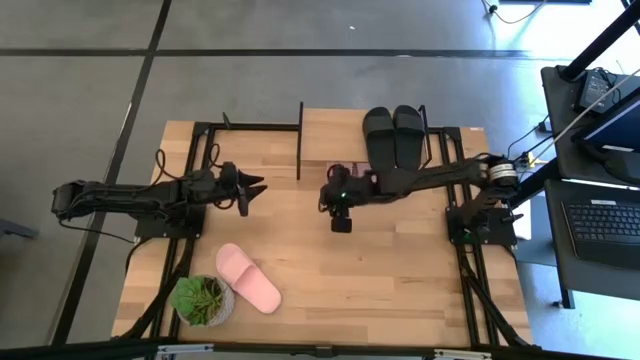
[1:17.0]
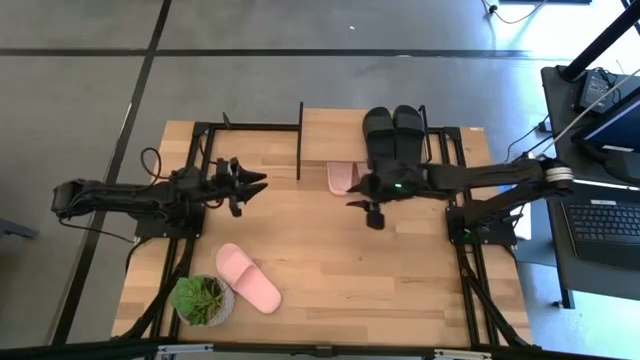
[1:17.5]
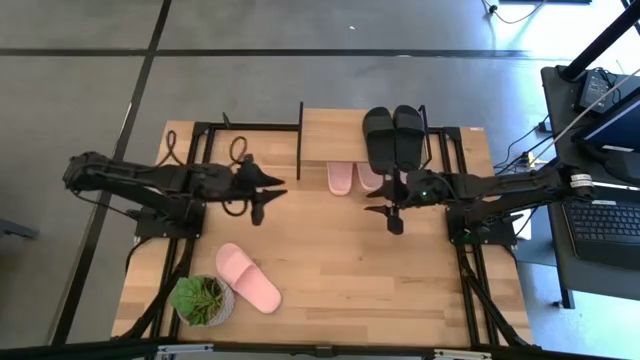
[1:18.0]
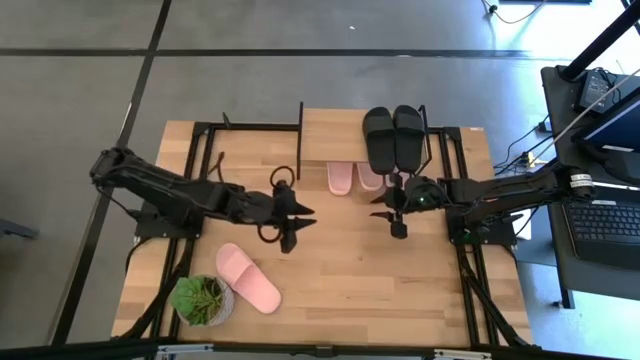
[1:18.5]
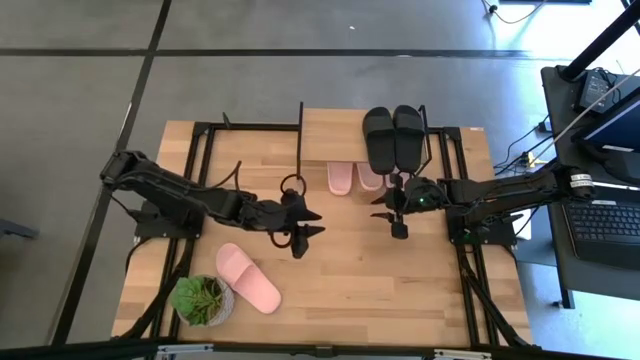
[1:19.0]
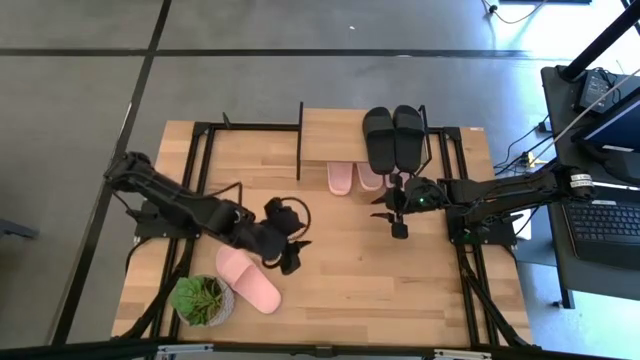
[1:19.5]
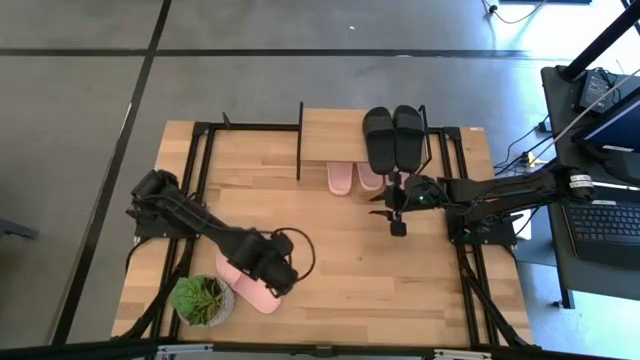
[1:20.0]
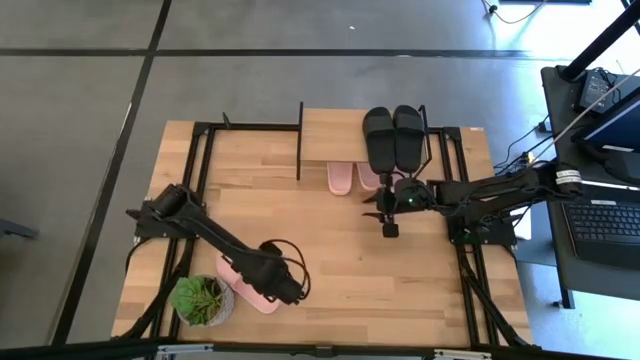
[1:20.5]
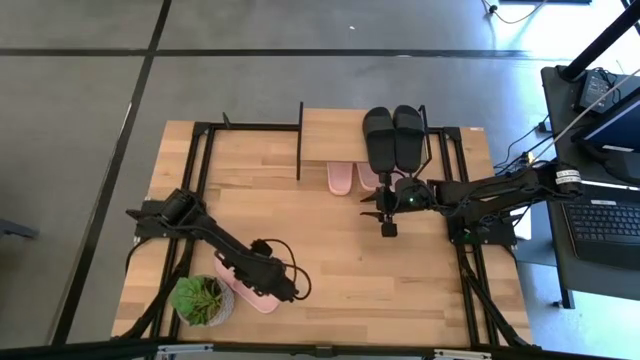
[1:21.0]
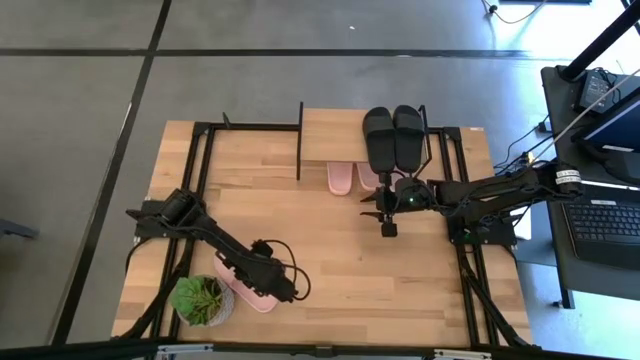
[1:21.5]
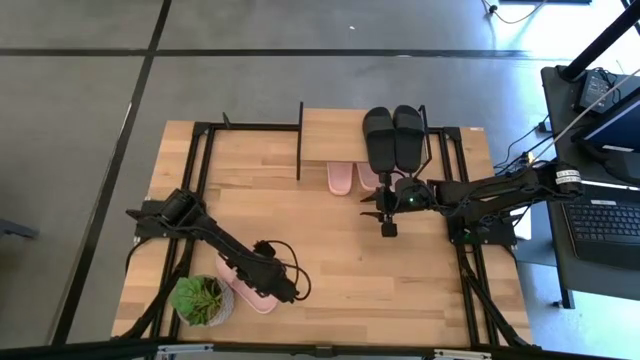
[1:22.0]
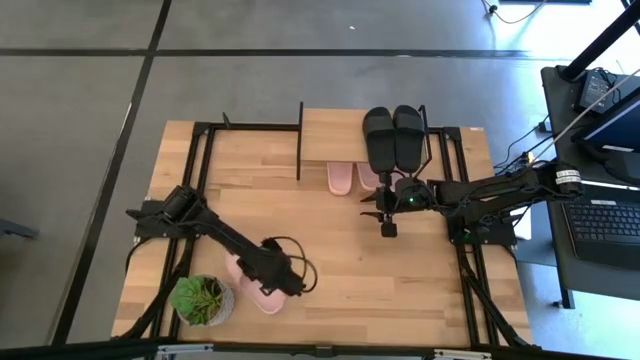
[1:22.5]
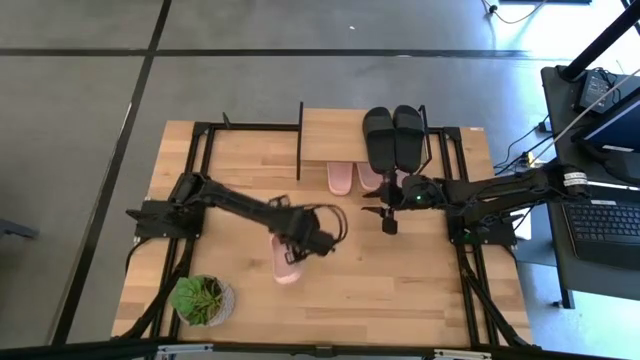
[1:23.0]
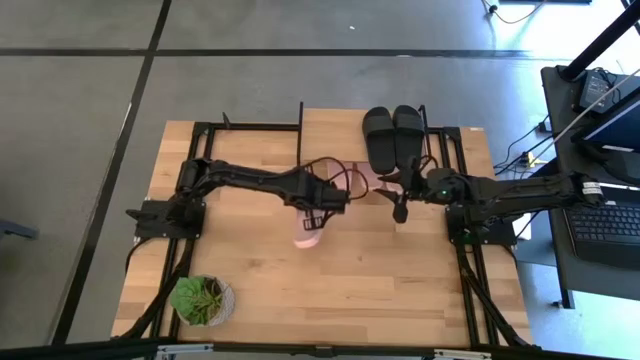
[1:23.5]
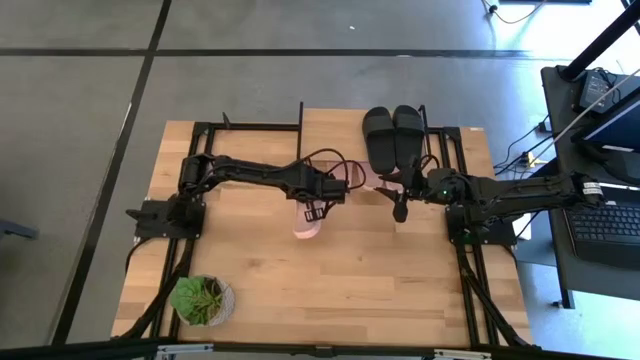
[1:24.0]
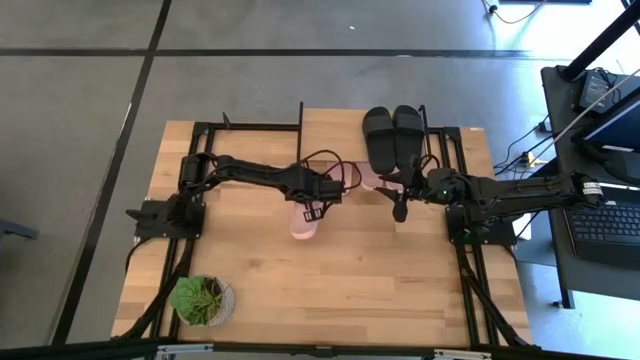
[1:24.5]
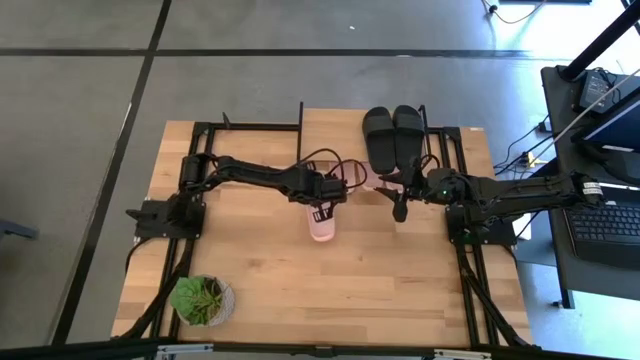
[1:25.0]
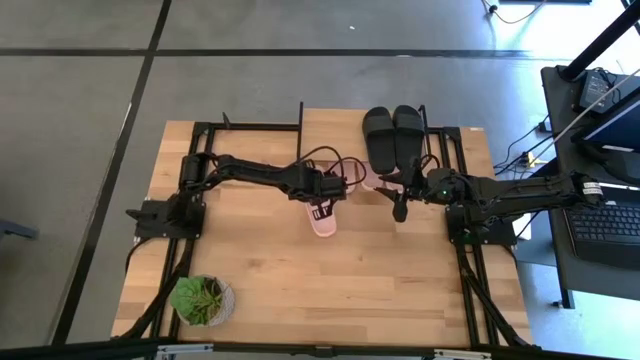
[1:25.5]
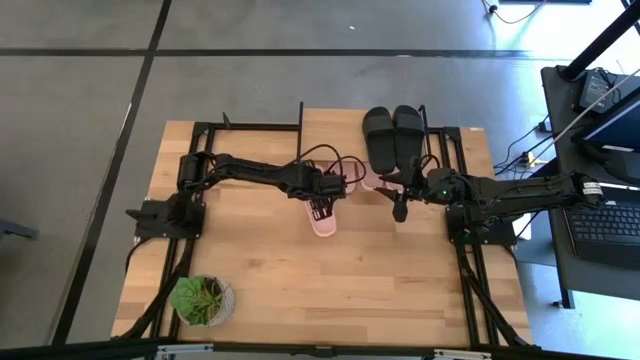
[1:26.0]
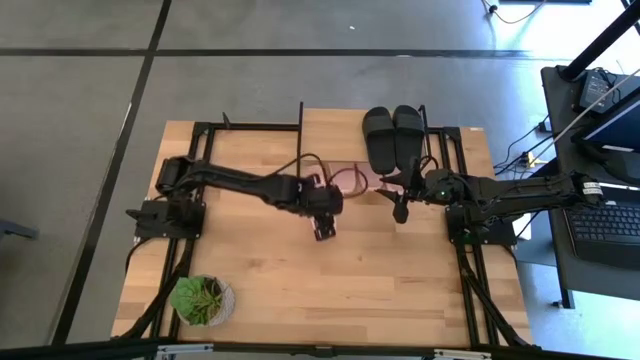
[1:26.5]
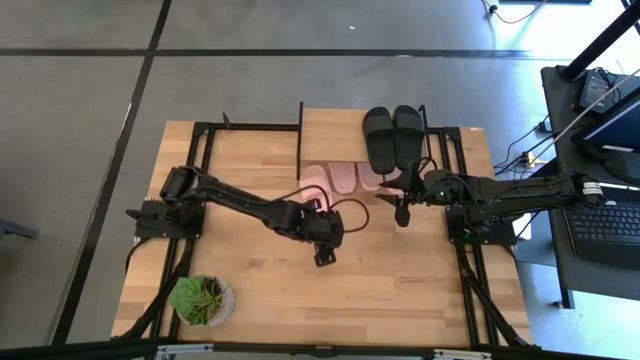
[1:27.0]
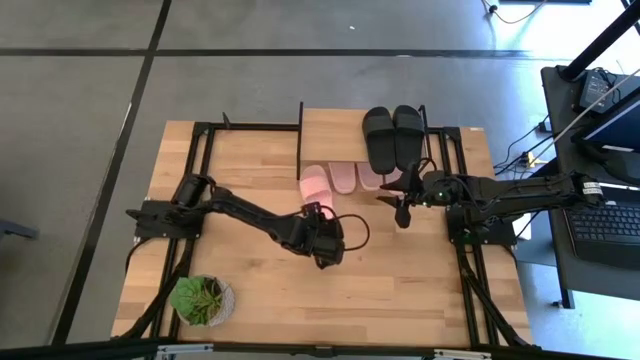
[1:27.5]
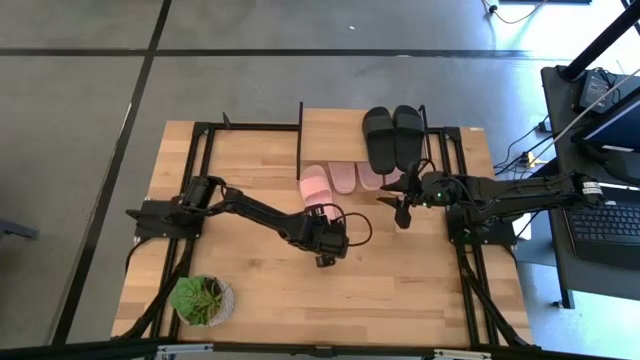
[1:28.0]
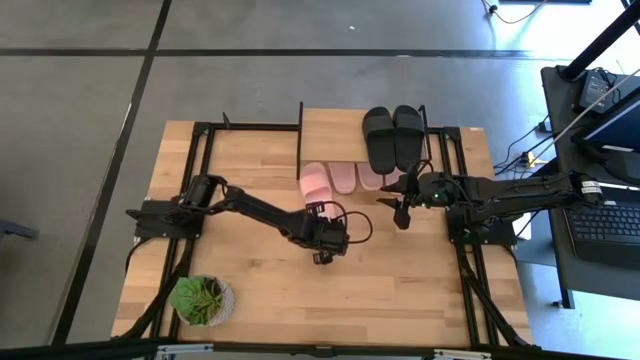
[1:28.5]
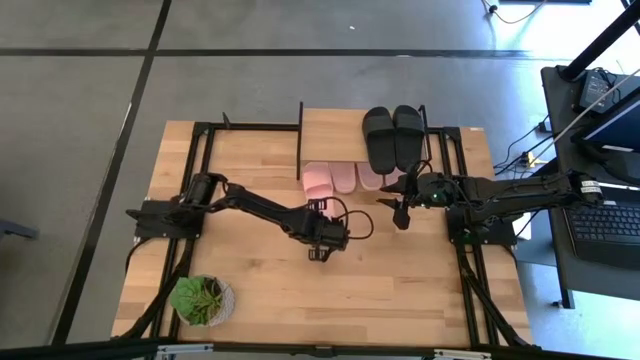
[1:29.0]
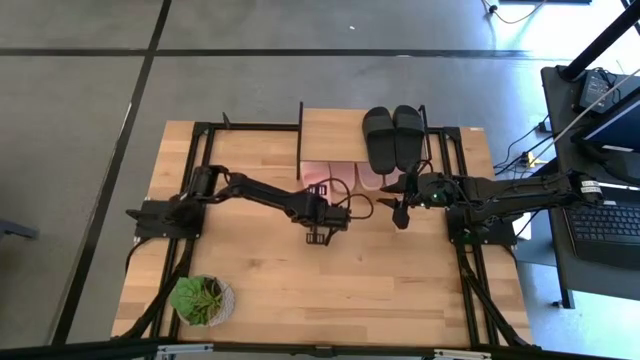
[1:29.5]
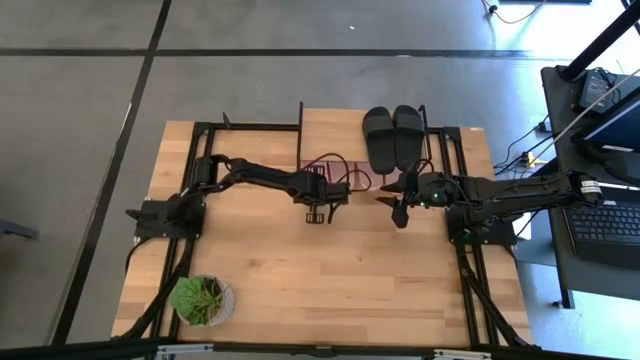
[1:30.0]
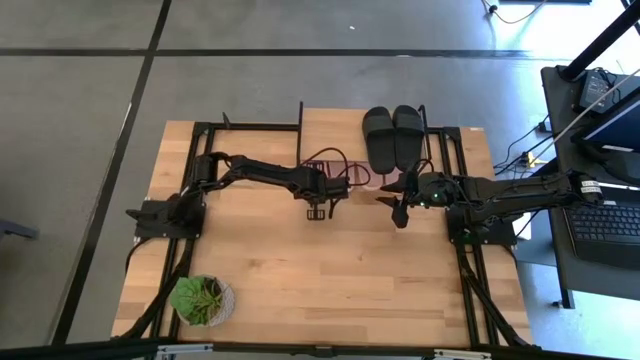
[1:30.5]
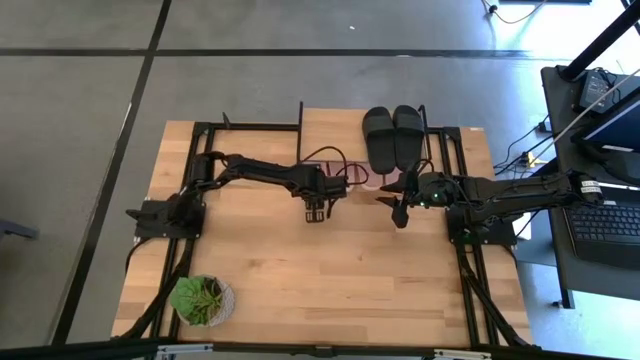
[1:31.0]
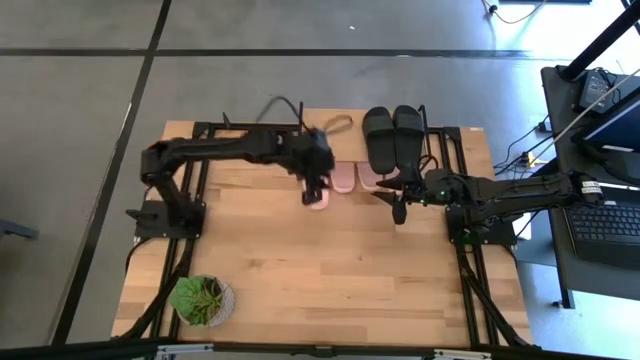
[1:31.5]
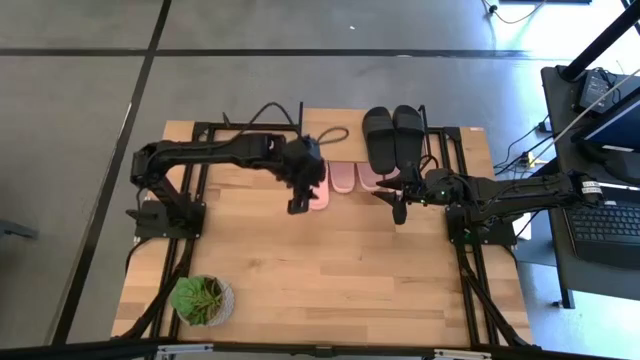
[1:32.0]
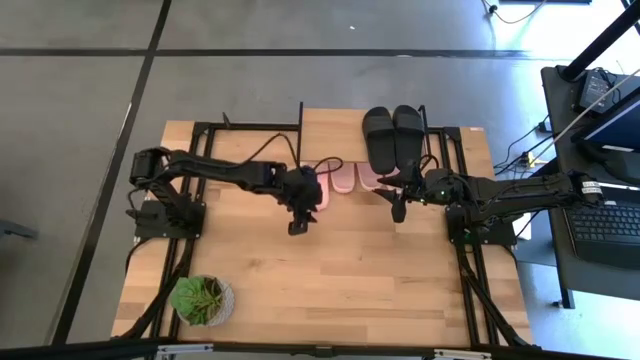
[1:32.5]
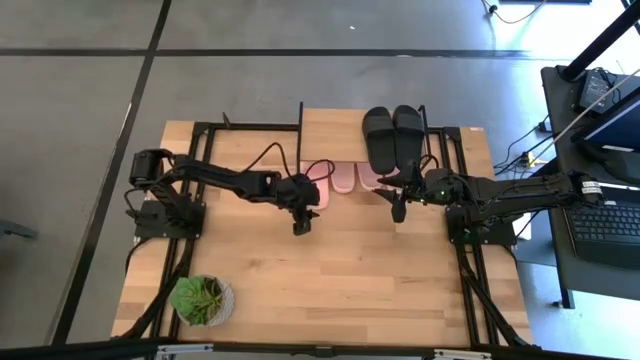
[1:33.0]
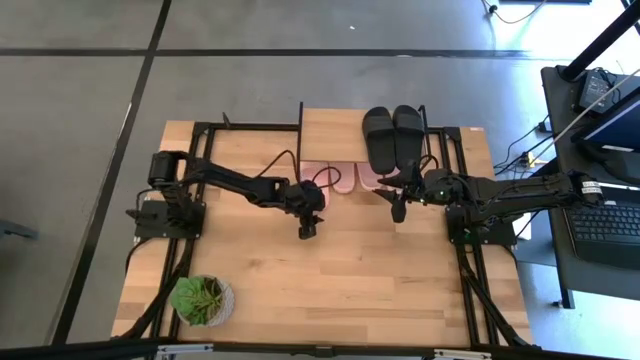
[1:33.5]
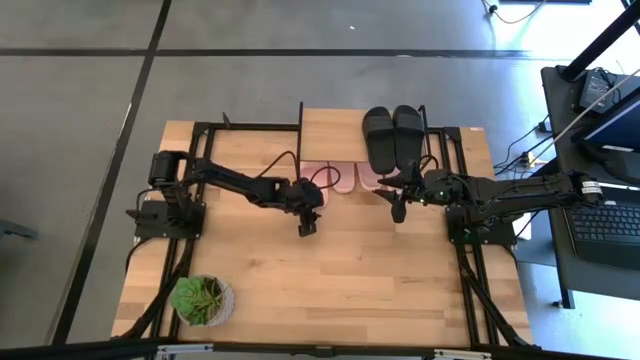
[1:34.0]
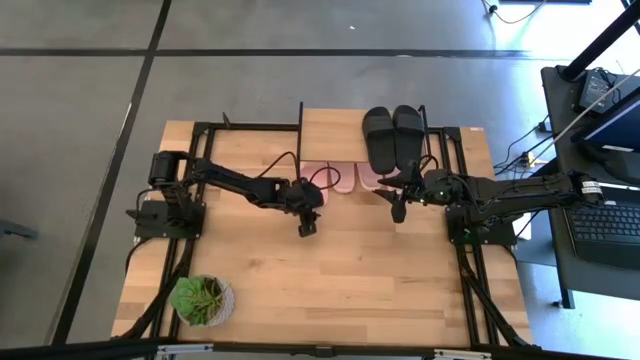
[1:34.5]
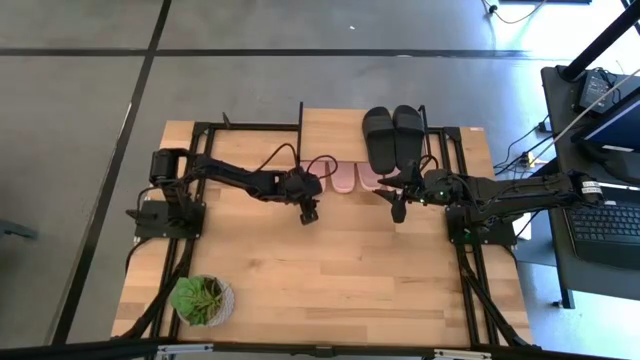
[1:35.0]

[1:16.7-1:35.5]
Task: Pick and place slides into the shelf
Put the pink slipper under the shelf

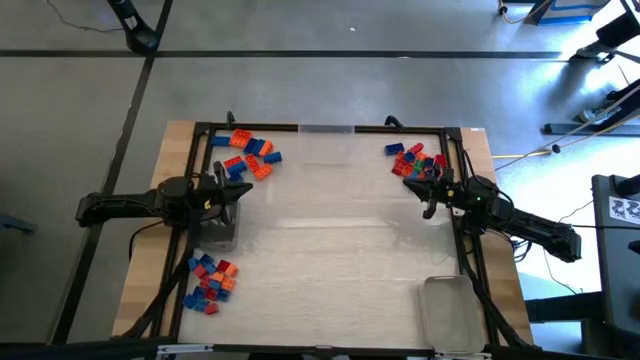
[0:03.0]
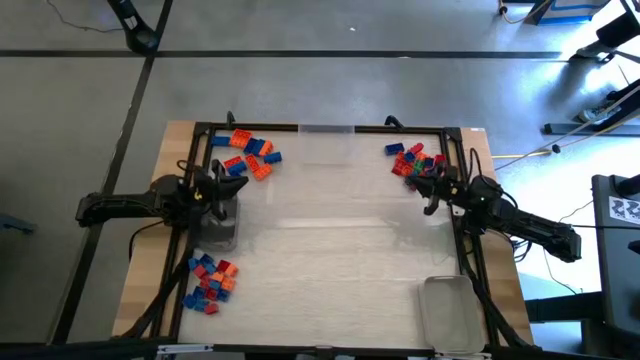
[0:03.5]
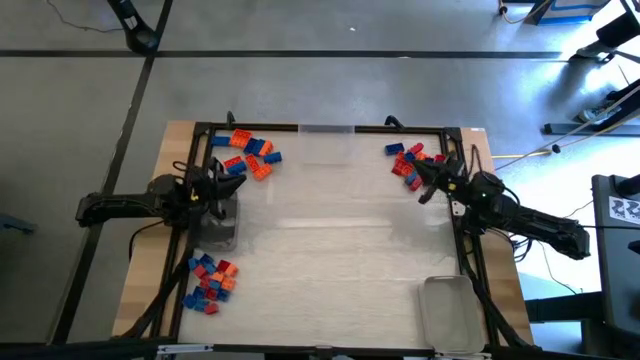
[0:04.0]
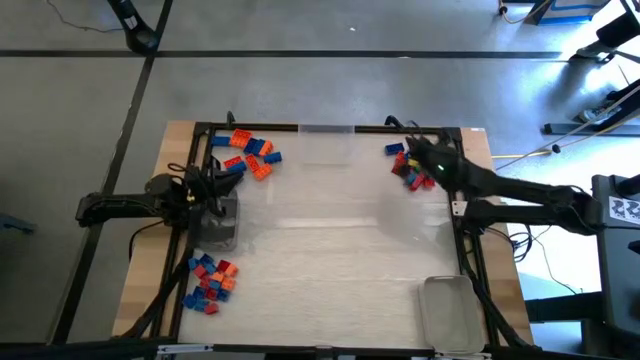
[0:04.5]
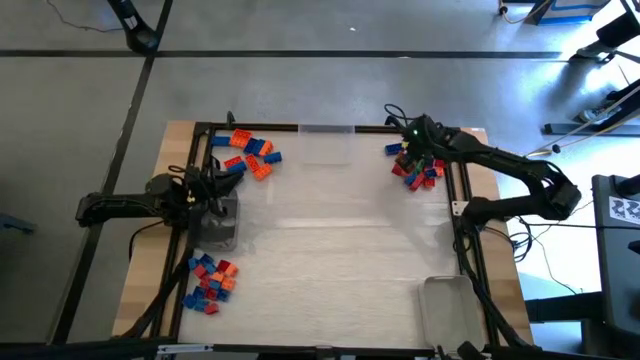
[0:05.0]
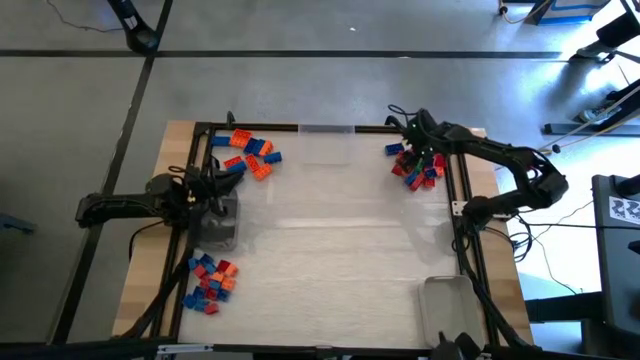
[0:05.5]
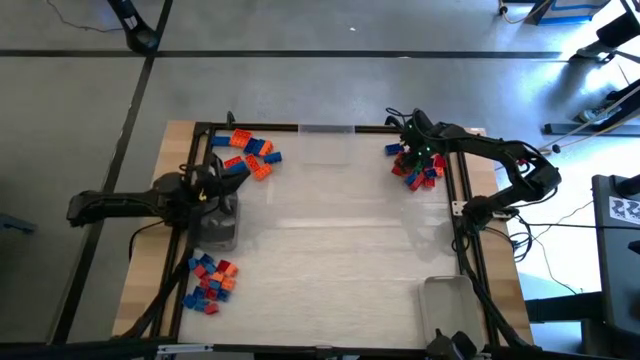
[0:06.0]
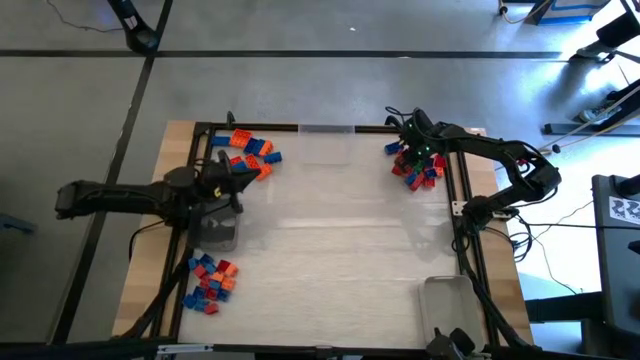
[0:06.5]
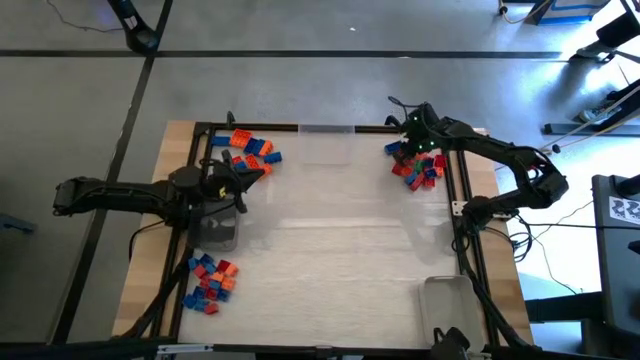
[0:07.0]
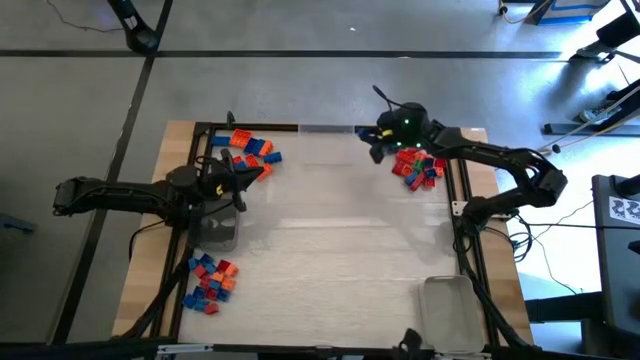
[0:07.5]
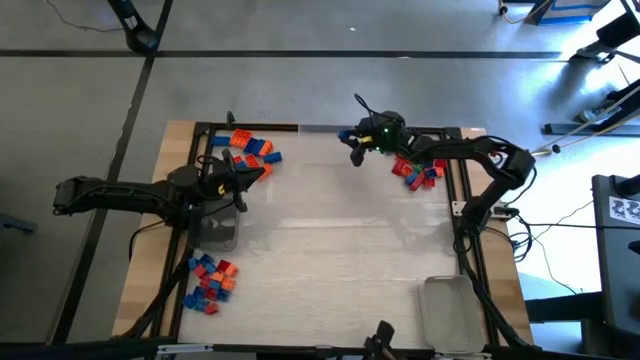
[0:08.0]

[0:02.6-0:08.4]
Task: Sort blocks by size
Put the blue 4 stud game piece into the transparent bin
